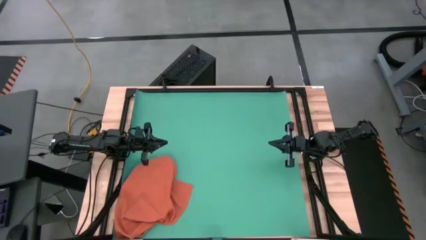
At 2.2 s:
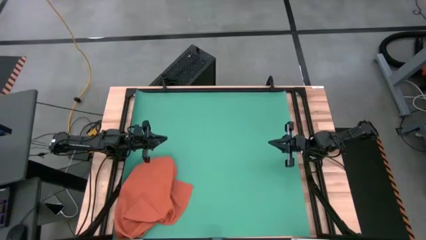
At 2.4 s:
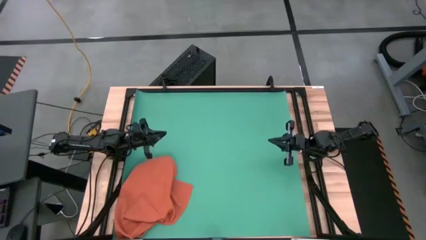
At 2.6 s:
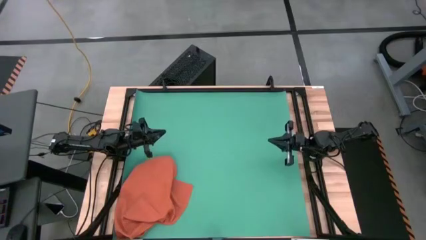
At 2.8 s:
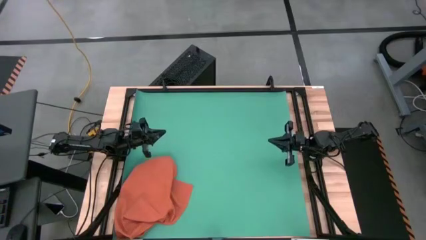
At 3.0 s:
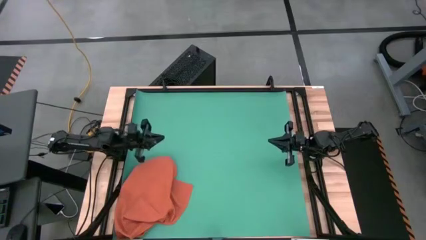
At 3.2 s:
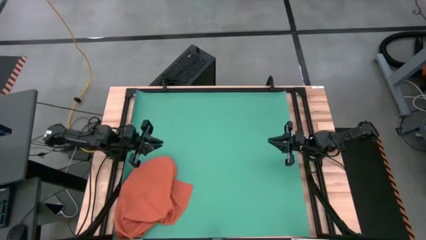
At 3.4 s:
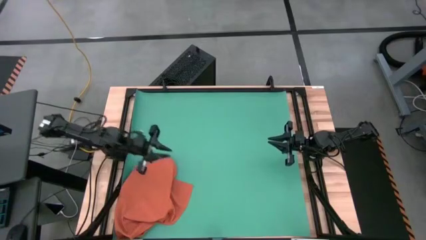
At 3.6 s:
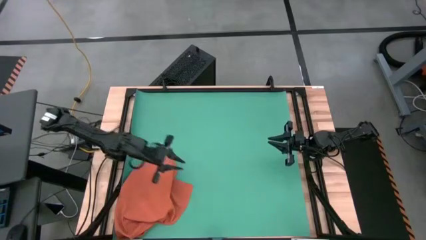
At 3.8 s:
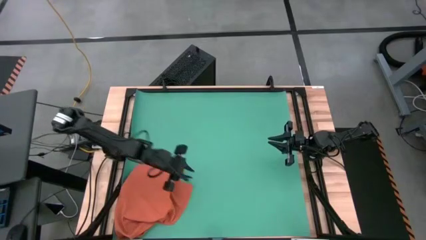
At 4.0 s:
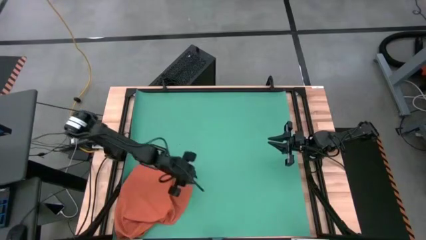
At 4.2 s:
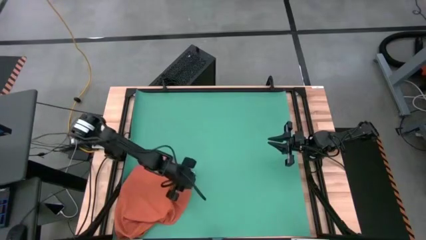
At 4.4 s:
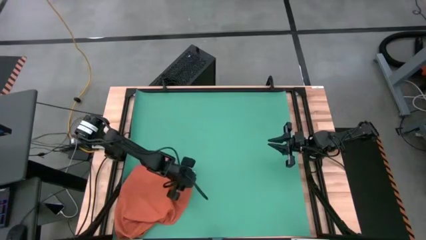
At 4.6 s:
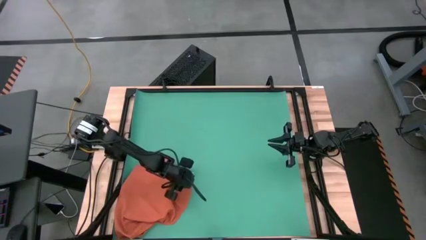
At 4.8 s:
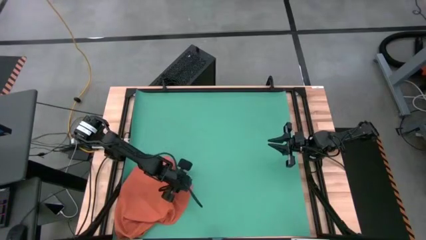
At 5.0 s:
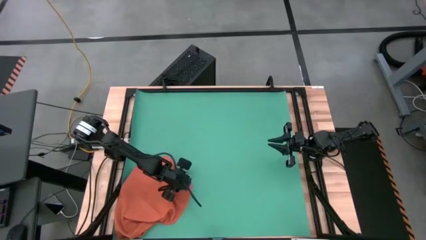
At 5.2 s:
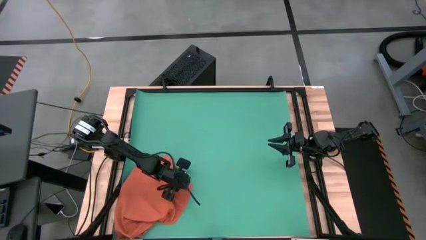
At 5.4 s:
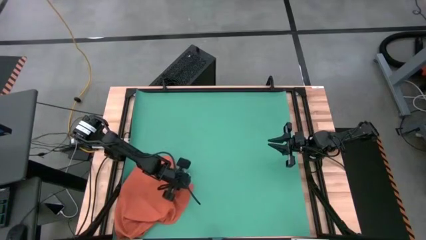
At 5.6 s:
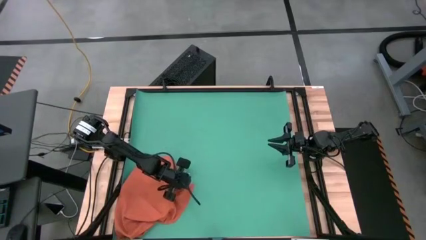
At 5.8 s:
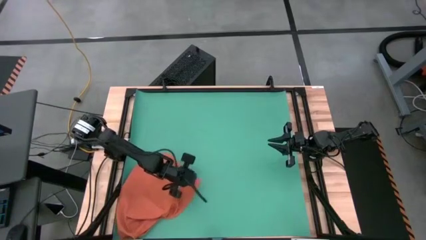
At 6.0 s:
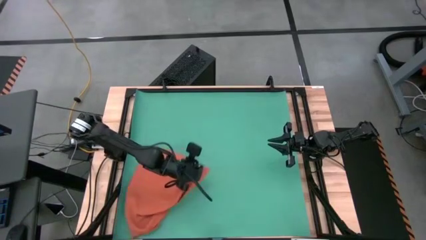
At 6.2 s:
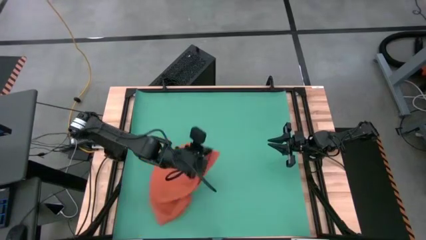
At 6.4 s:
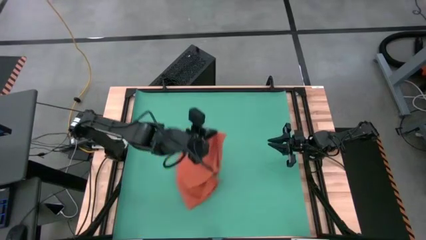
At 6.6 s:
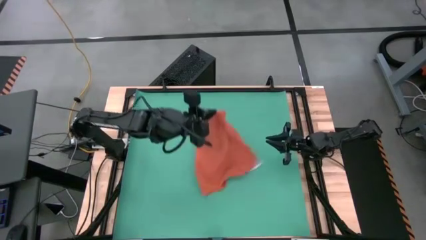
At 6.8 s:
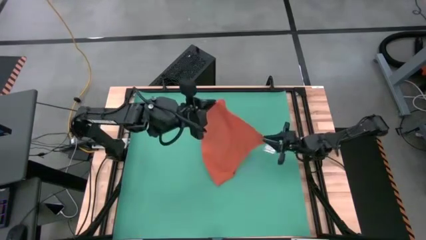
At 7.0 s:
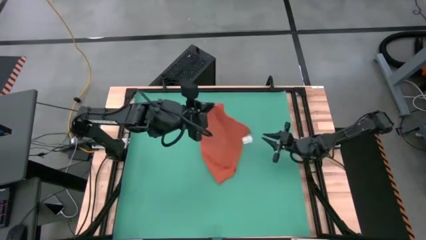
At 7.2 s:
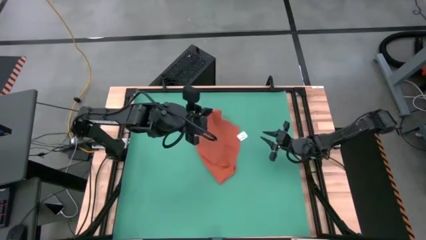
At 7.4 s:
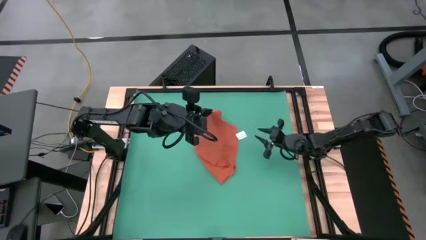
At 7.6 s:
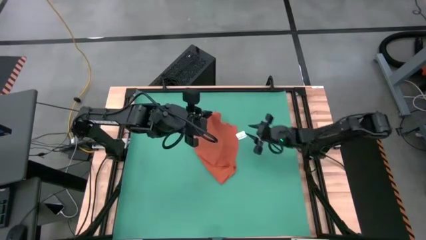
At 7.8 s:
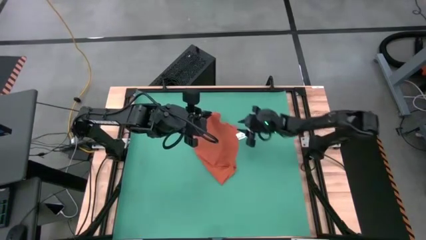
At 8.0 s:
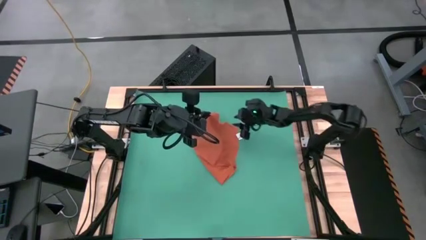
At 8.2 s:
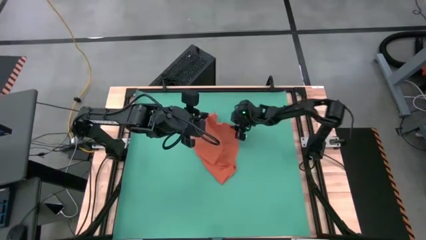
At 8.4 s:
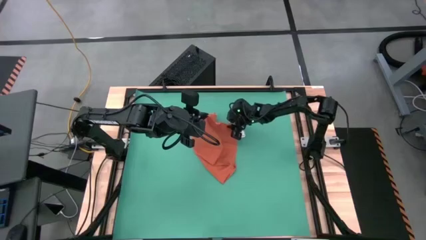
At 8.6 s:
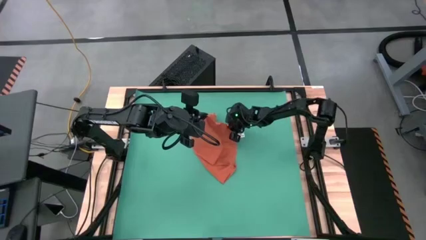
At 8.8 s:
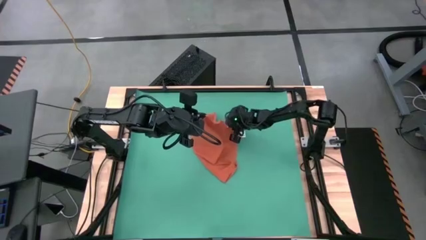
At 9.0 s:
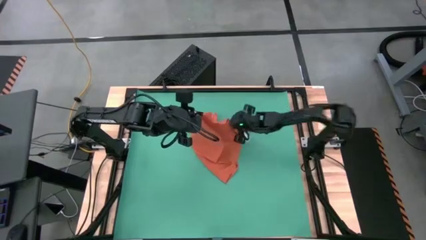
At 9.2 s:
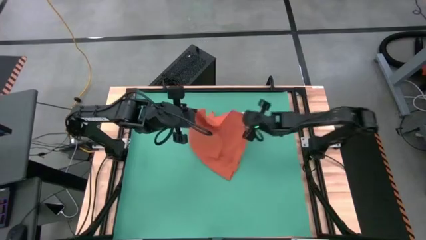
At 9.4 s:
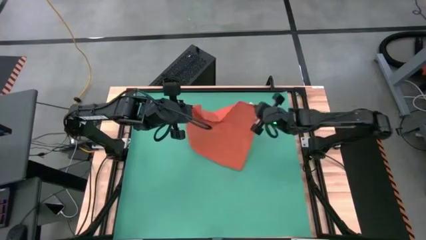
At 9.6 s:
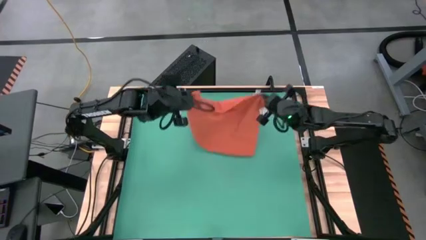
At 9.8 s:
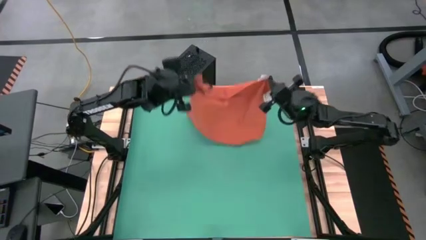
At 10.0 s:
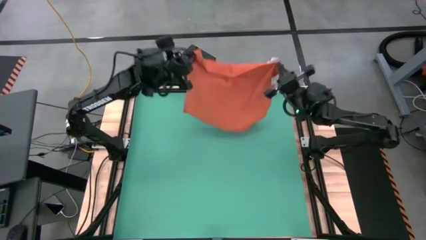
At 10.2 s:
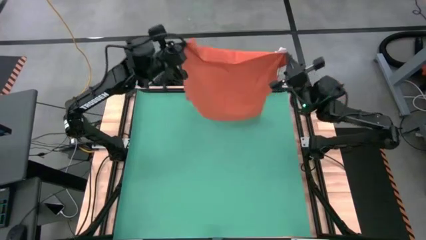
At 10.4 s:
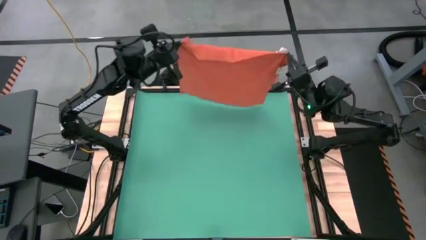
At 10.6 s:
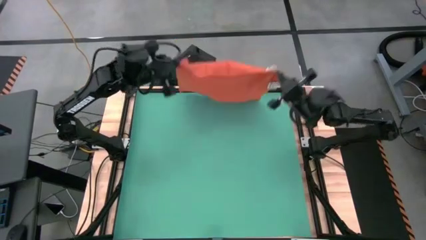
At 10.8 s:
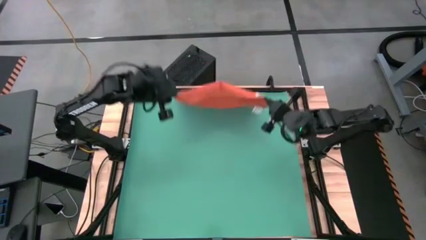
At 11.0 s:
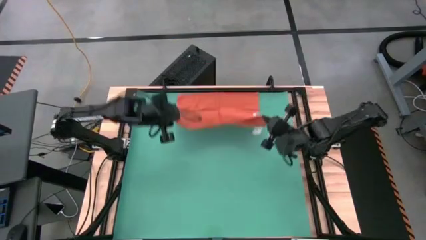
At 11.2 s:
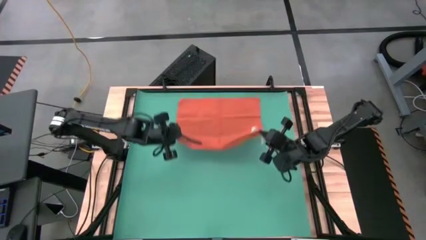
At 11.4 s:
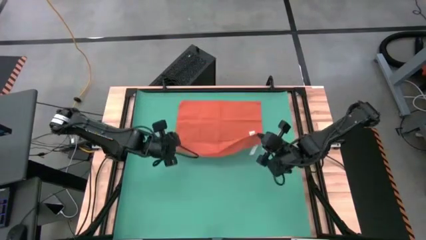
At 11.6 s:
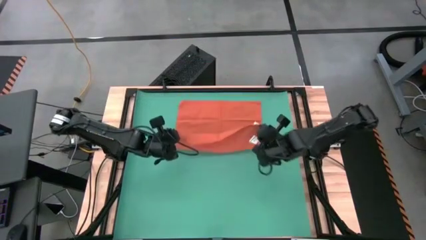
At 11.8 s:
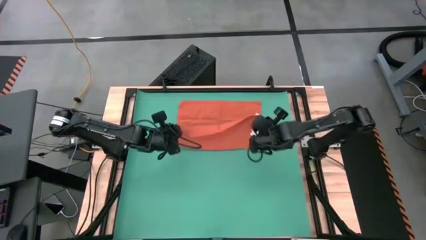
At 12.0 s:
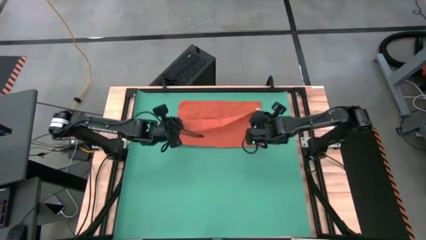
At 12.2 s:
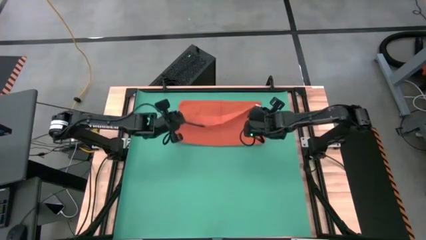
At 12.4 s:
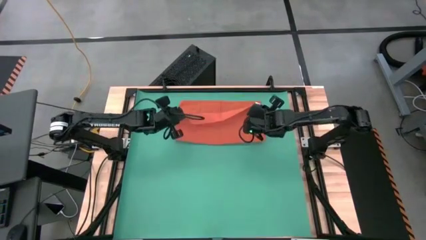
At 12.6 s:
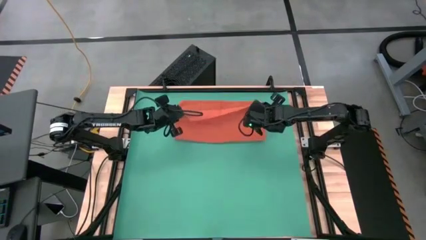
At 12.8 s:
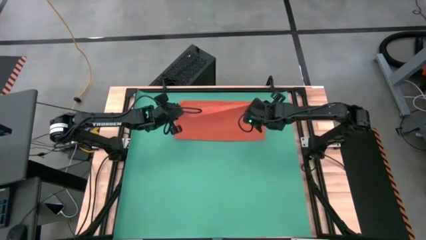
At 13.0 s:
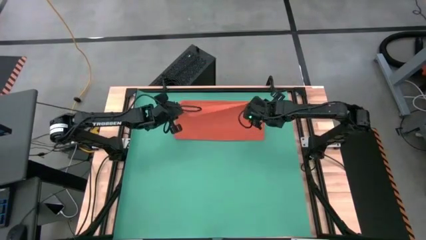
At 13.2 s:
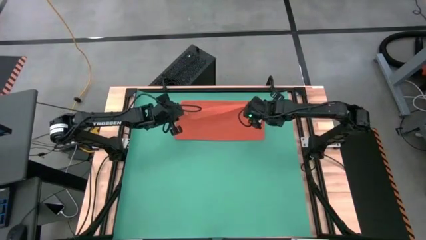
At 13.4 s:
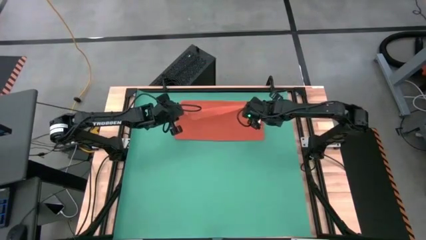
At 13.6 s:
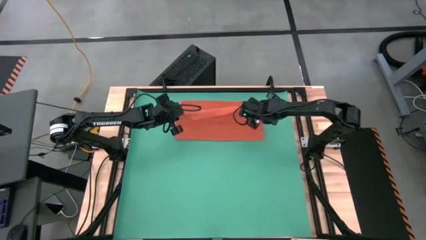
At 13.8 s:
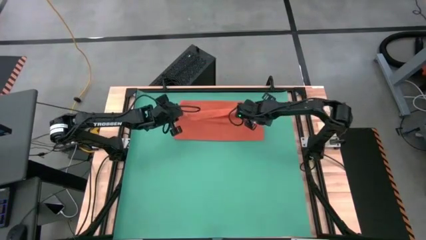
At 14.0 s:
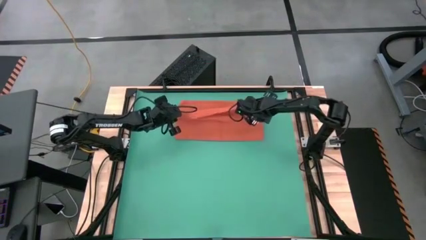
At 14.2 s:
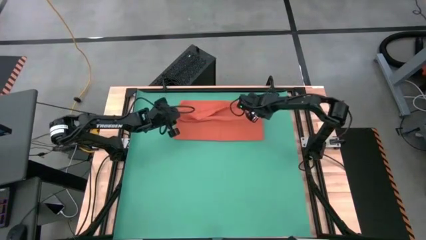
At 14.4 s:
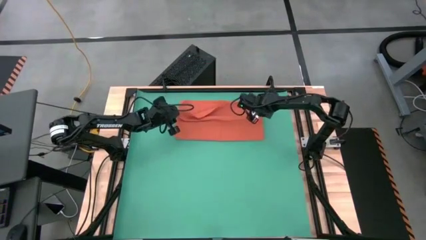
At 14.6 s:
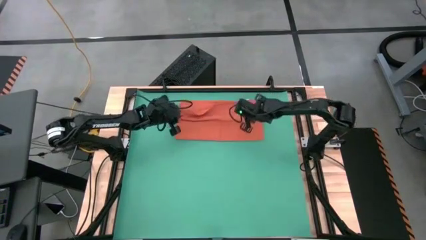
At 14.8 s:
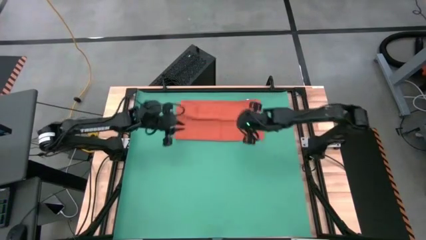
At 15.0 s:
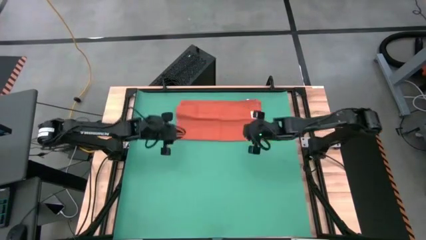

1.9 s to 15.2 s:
Task: Roll towel into tight, uniform cylinder
Fold the orange towel
